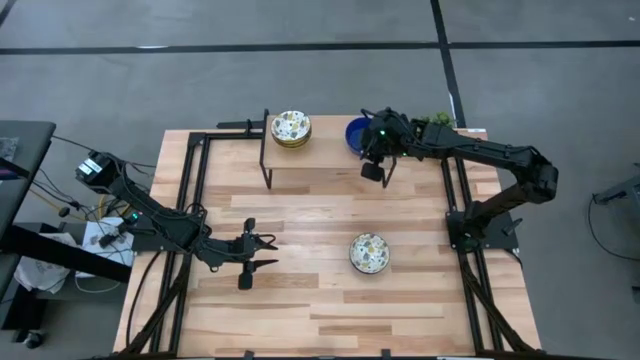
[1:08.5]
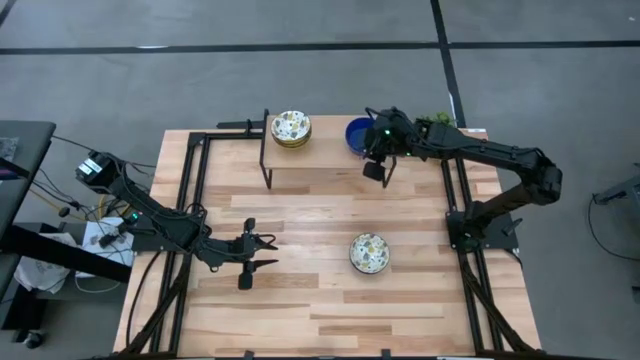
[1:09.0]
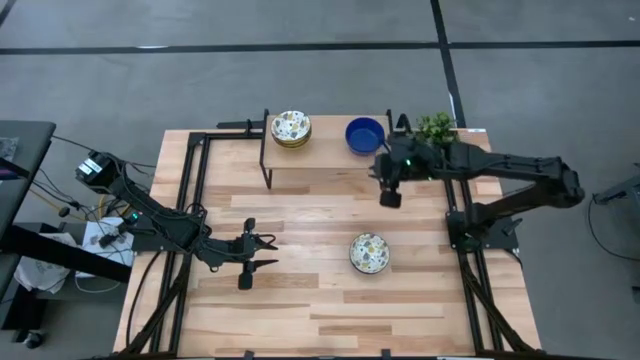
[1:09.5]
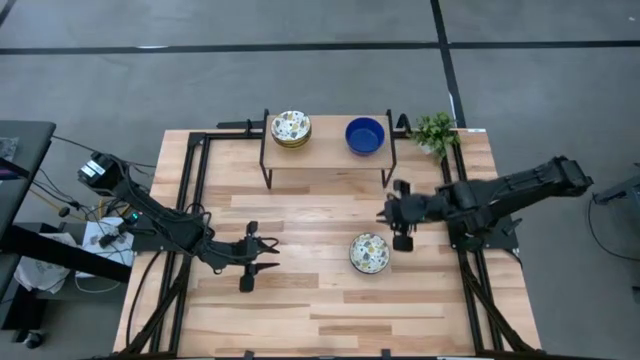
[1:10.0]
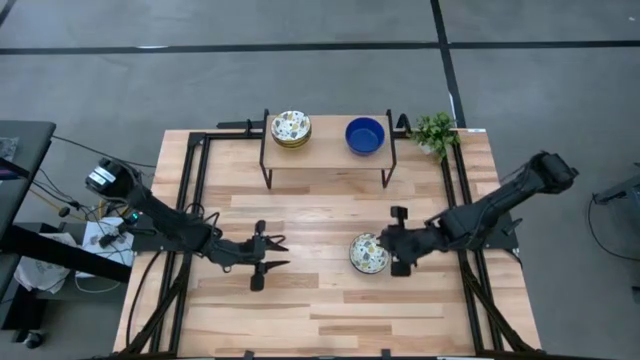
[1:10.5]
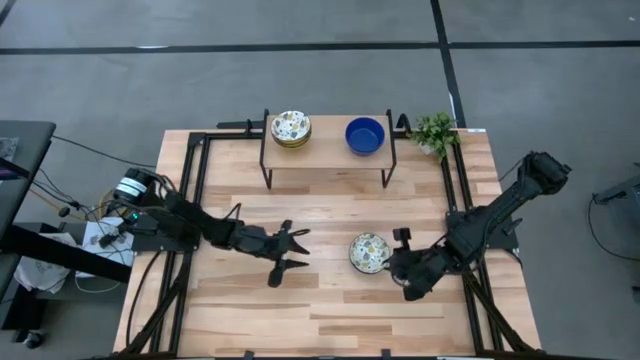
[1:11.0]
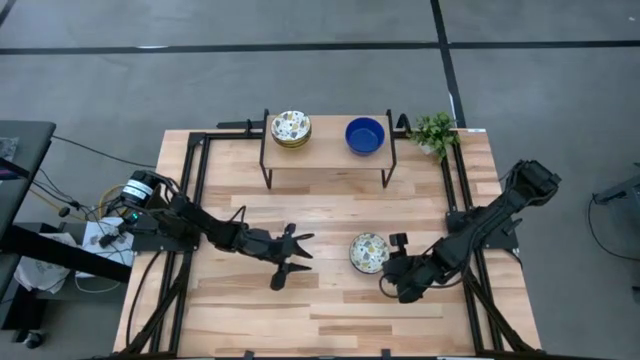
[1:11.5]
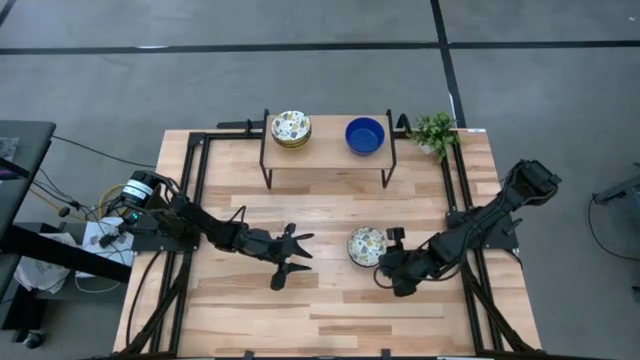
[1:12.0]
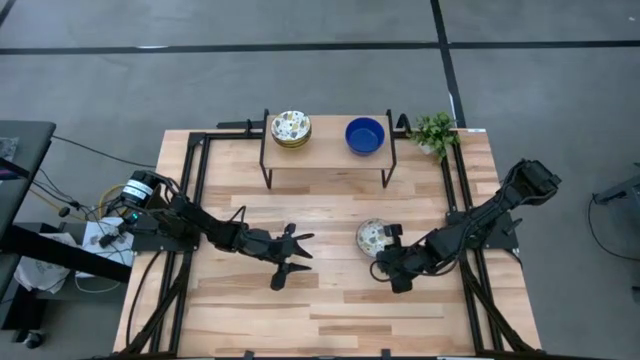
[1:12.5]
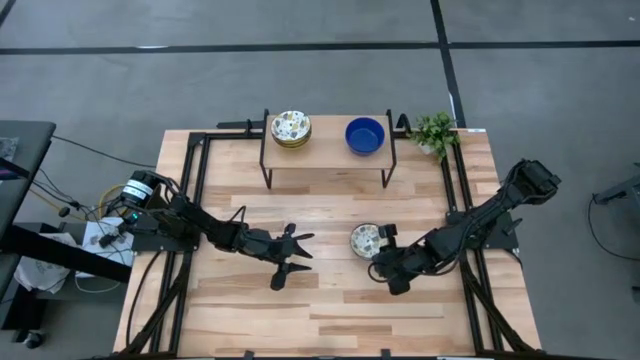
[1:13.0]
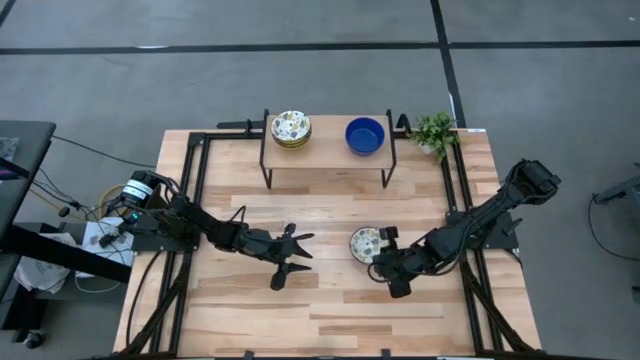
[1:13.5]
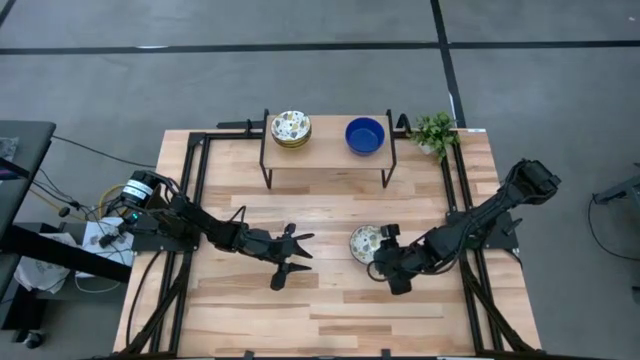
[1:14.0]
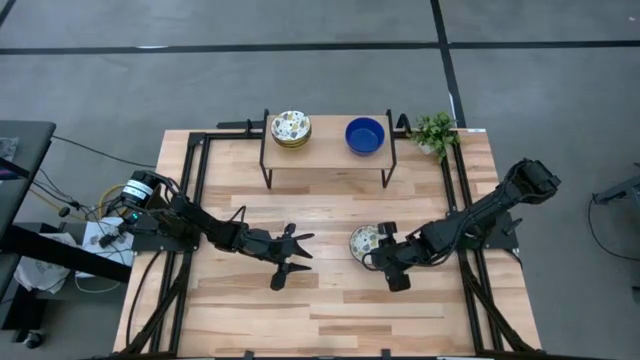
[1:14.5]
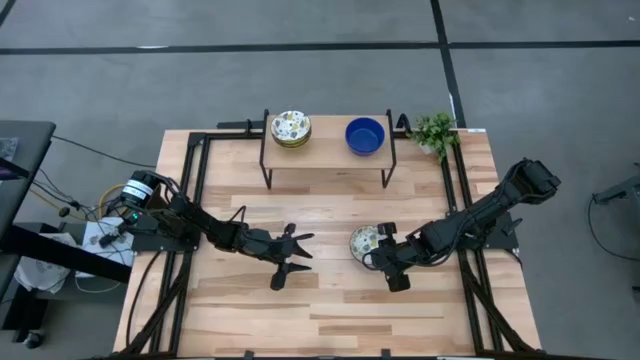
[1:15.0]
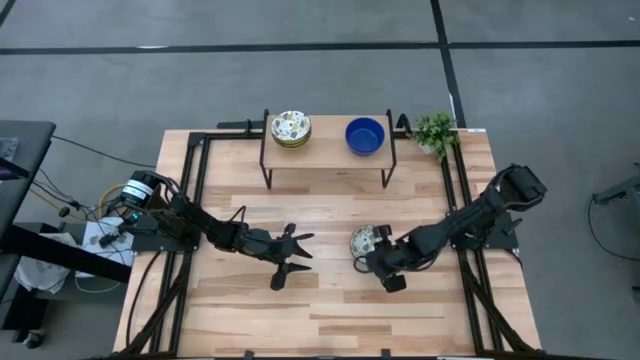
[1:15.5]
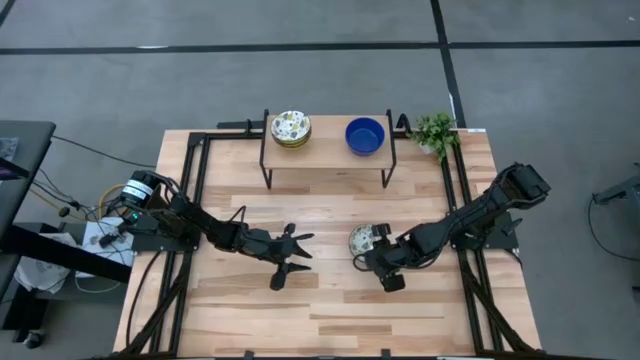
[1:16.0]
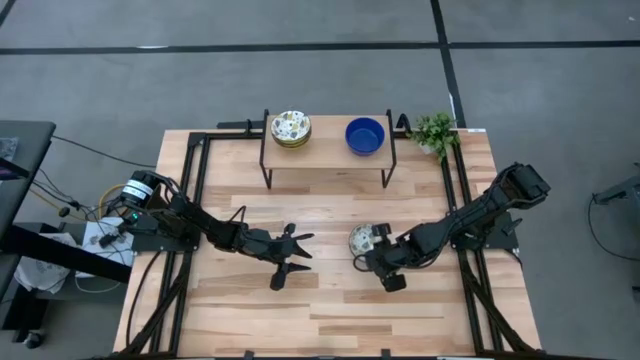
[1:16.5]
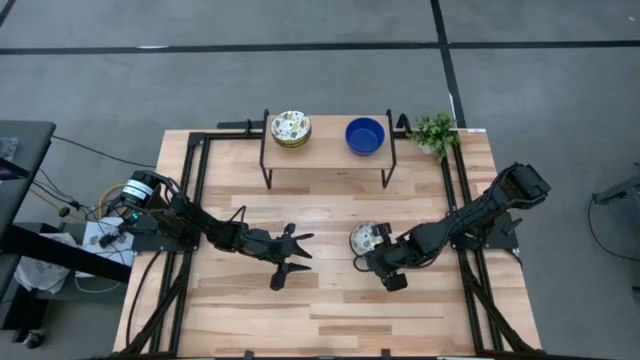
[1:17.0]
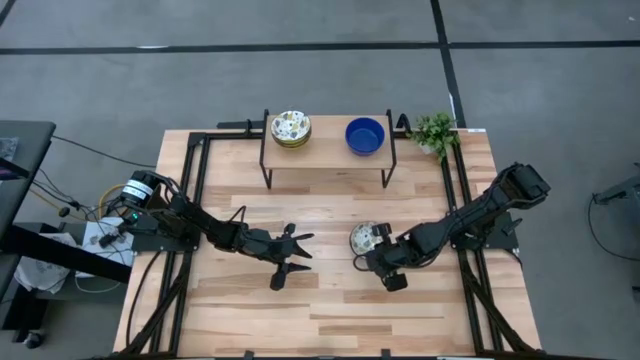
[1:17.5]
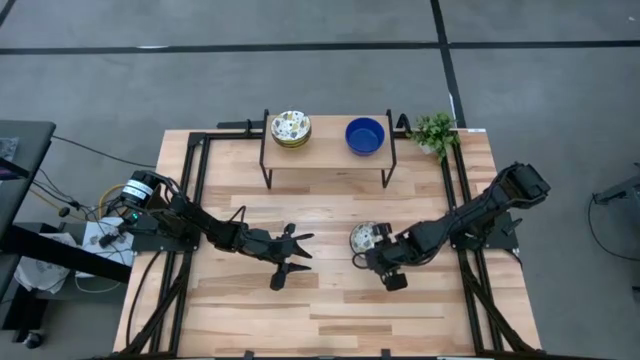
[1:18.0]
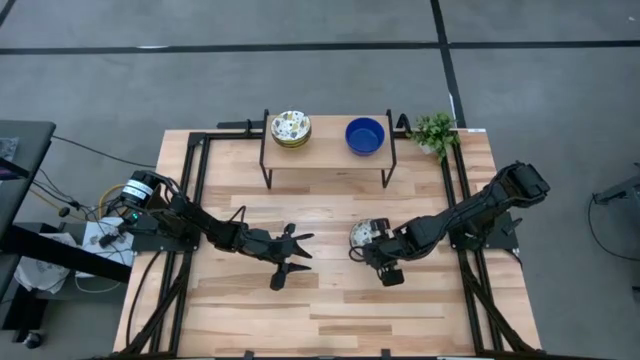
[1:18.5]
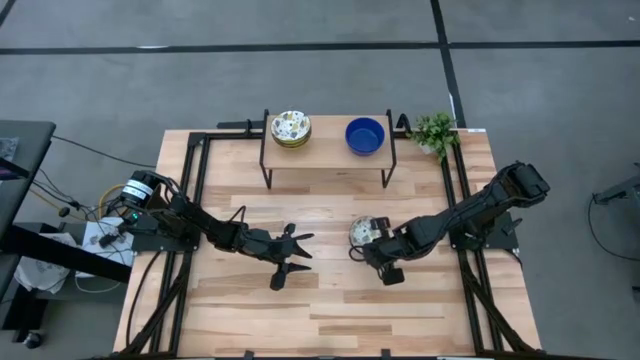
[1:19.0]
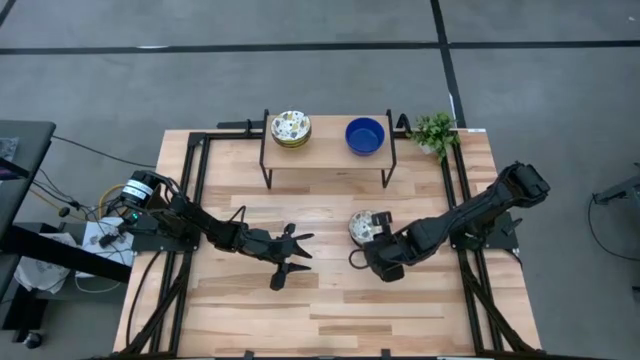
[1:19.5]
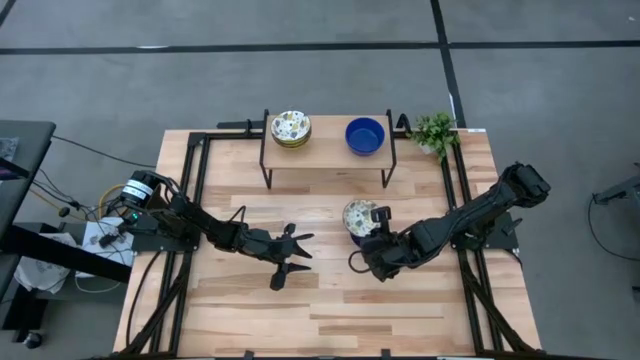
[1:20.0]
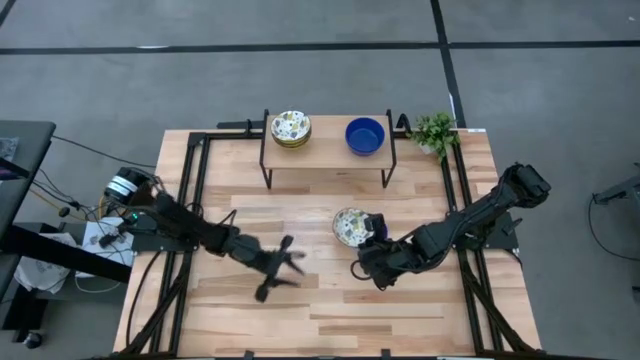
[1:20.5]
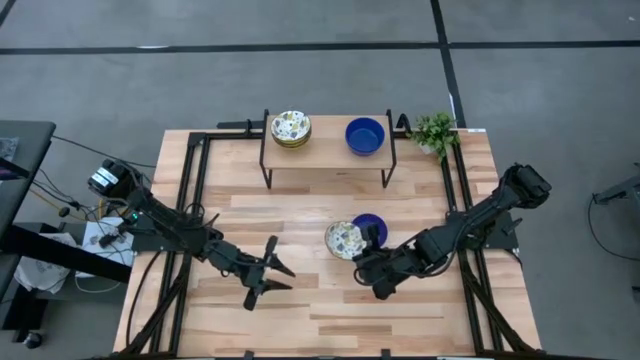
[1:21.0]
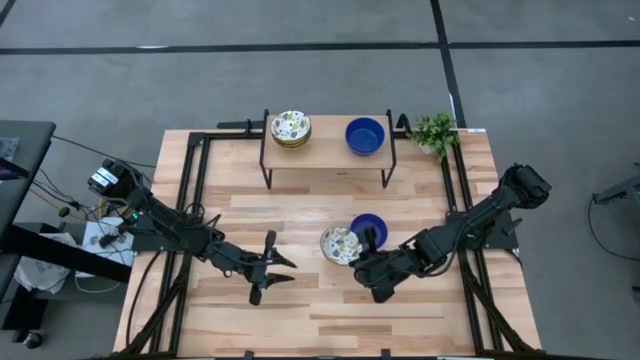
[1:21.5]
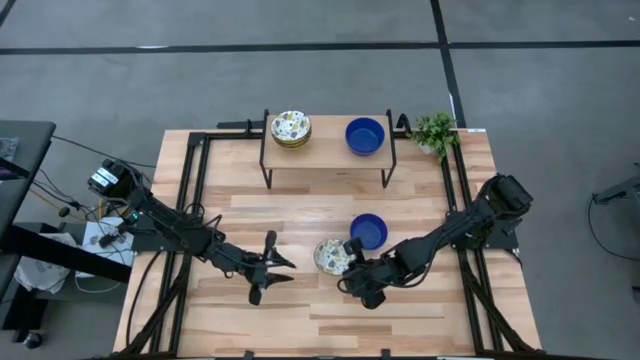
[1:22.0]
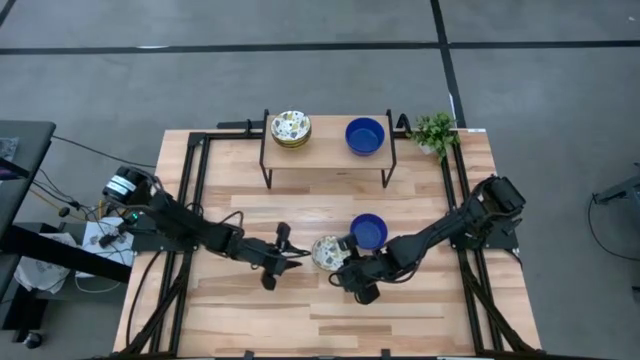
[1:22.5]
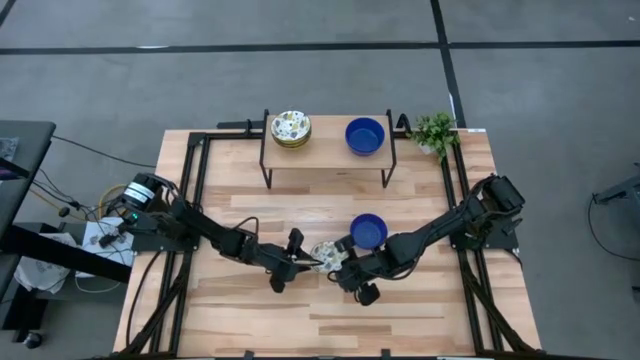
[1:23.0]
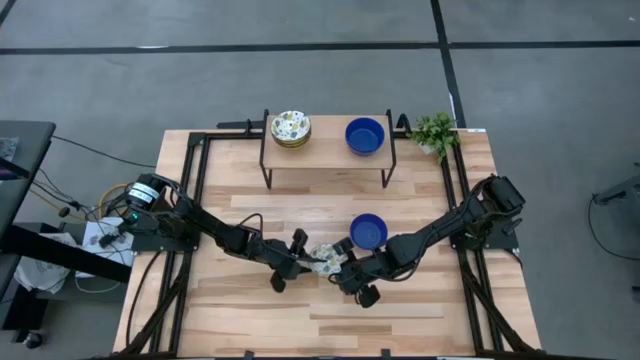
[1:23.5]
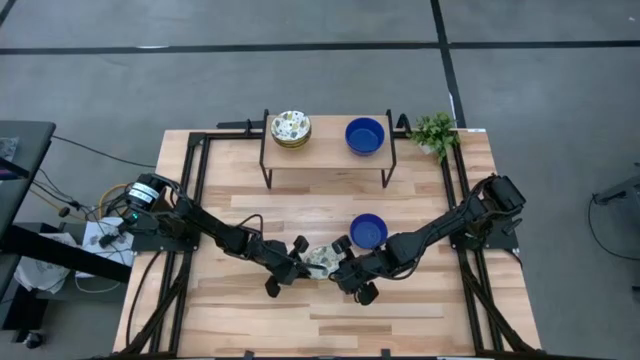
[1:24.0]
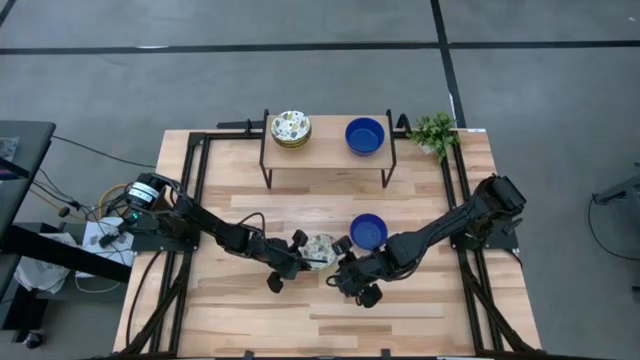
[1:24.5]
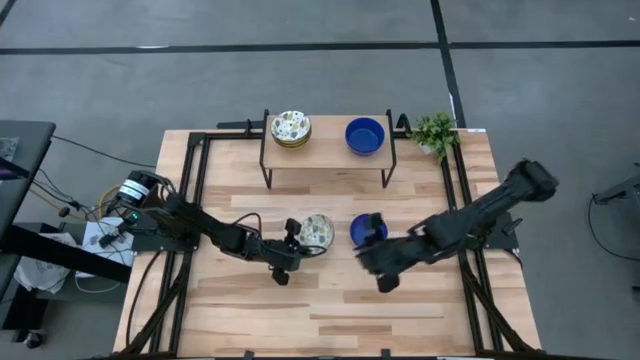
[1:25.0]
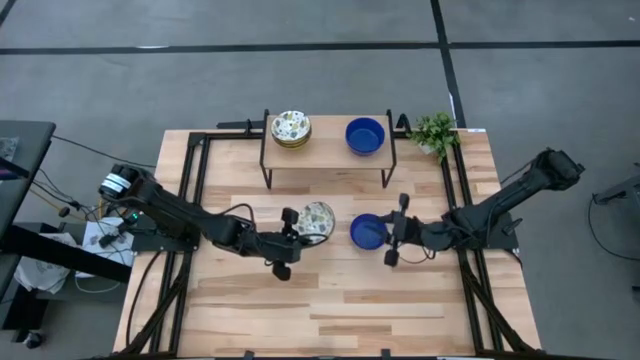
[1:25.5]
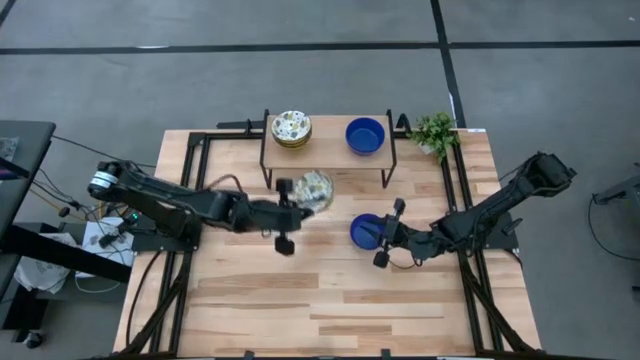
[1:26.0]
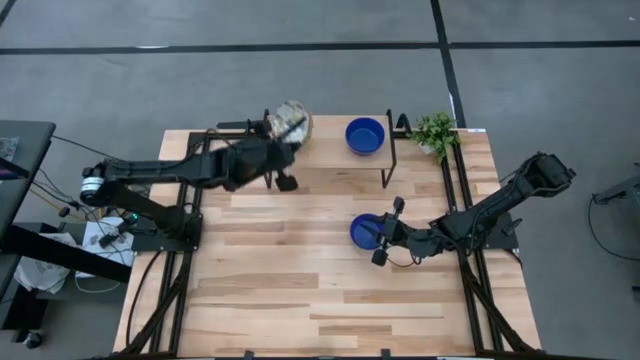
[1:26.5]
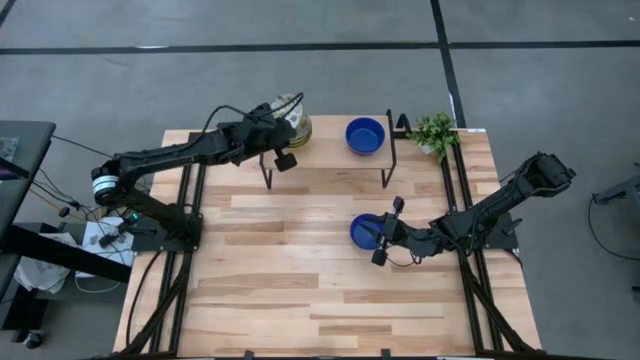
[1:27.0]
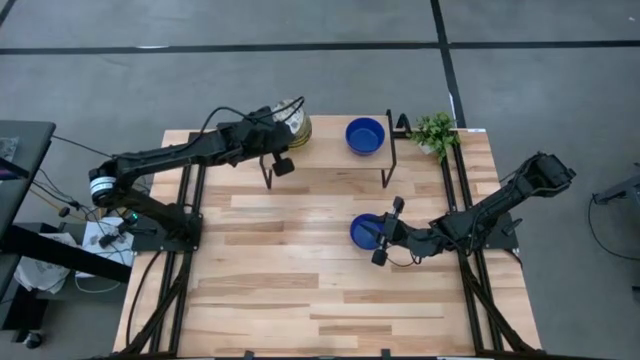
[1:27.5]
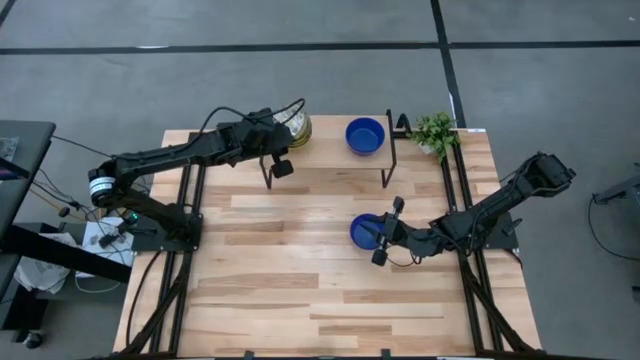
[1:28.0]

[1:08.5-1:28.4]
Task: Pick & Place Mini bowls
Stack the white patterned bowl on top of the white patterned bowl on the shelf

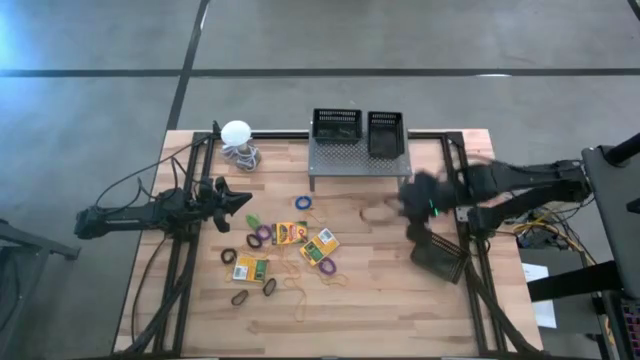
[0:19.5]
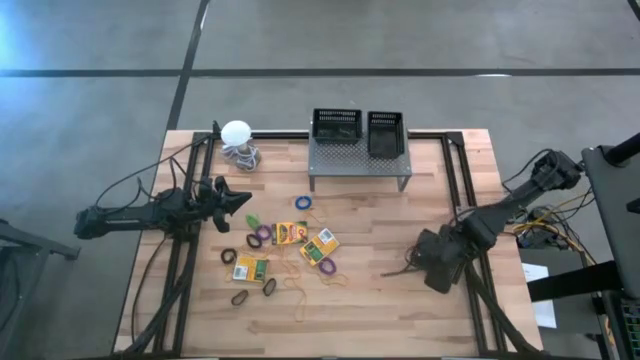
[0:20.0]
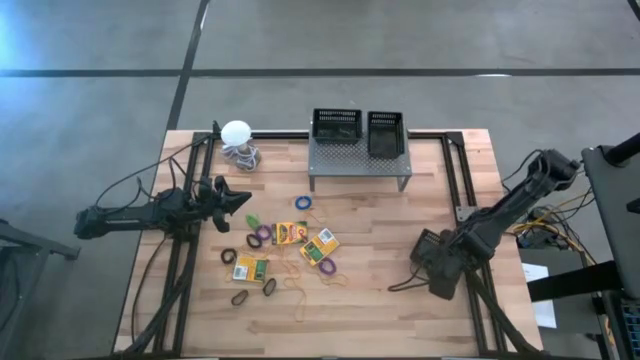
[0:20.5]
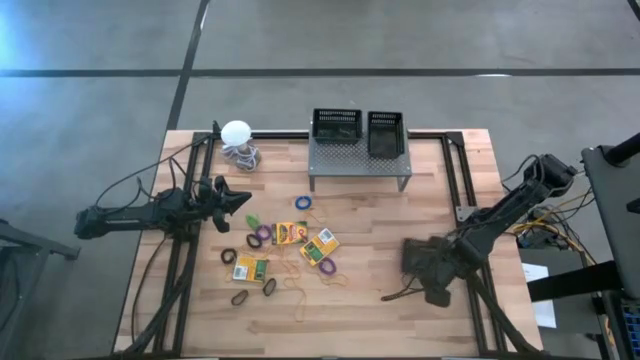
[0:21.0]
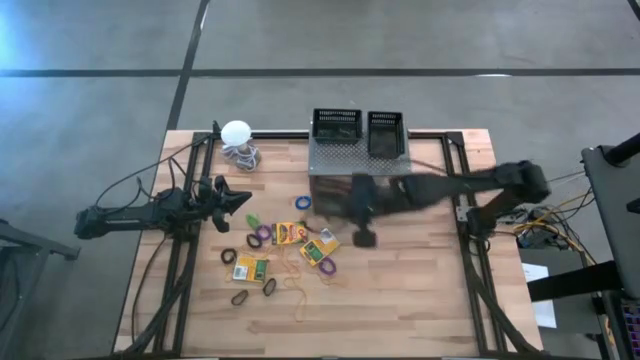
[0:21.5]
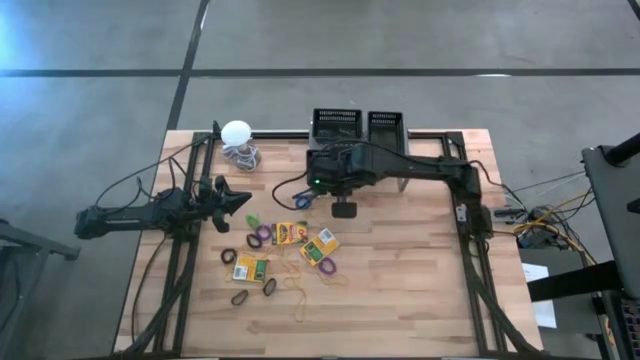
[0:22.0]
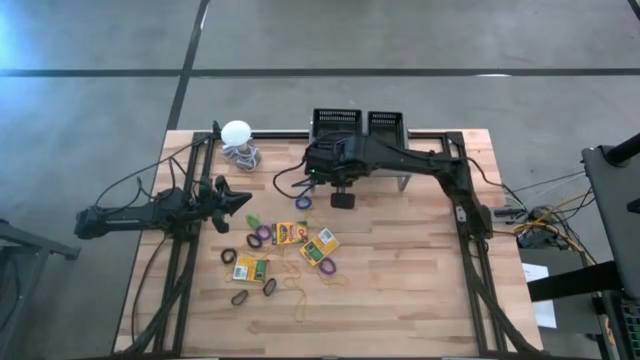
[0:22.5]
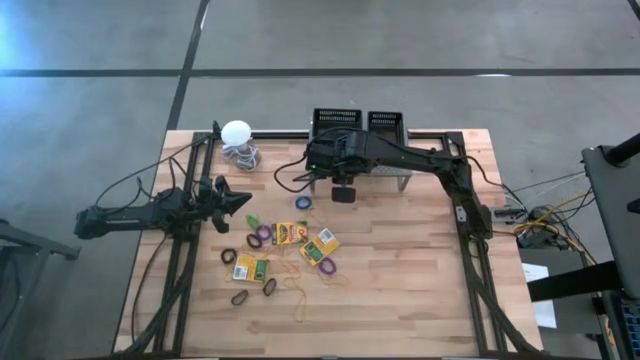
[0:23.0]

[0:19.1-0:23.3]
Task: Pick & Place Office Desk Supplies
Put the black bin on the shelf
